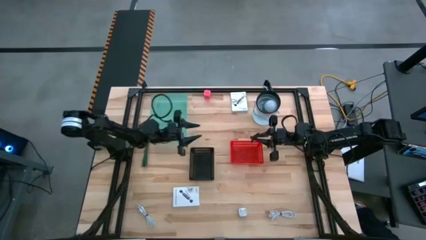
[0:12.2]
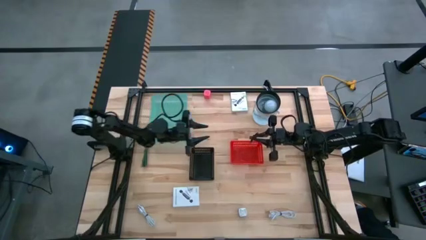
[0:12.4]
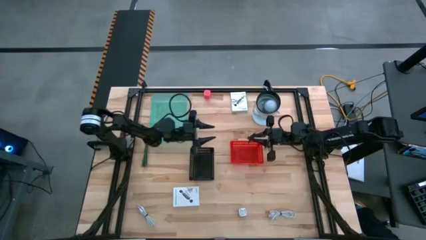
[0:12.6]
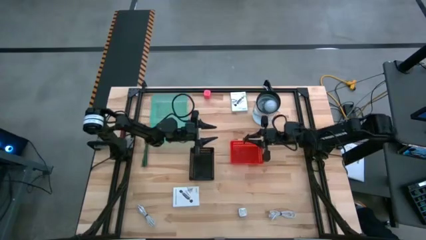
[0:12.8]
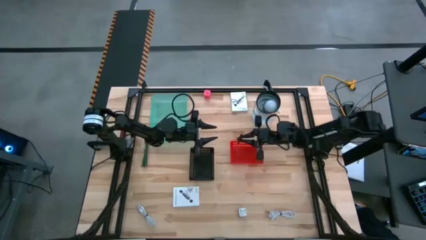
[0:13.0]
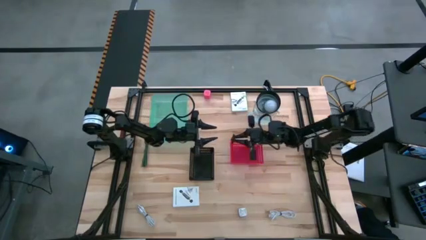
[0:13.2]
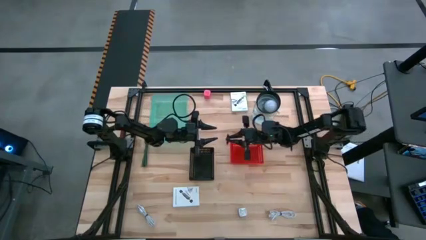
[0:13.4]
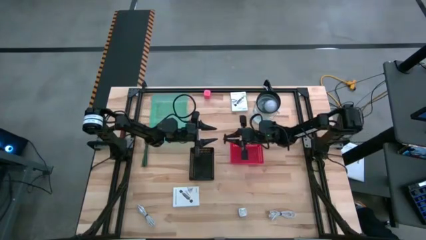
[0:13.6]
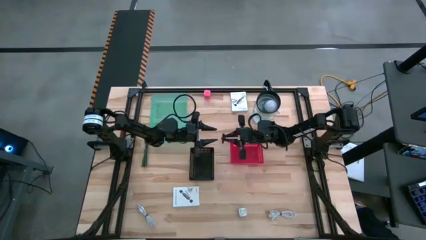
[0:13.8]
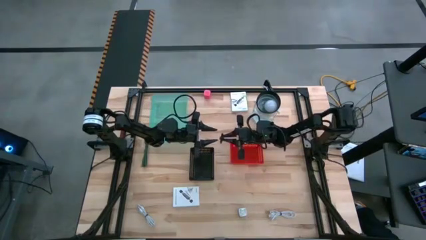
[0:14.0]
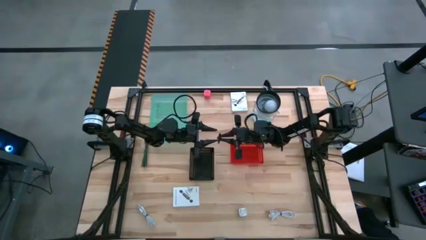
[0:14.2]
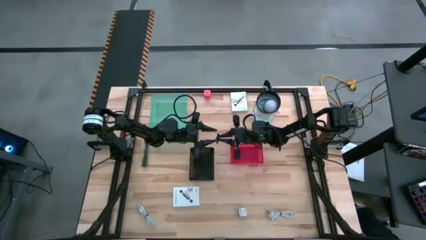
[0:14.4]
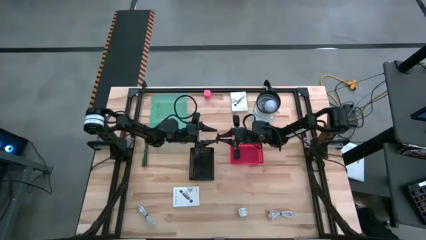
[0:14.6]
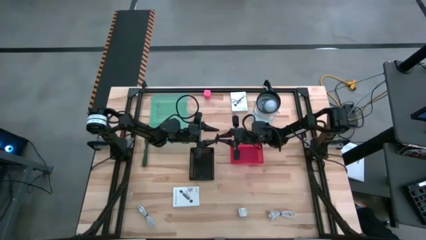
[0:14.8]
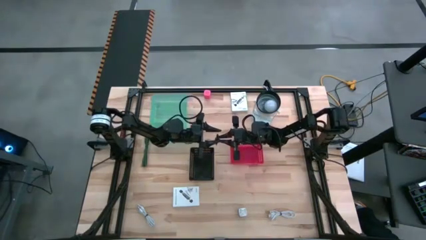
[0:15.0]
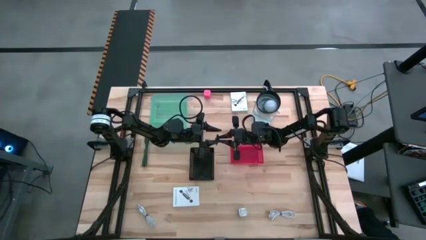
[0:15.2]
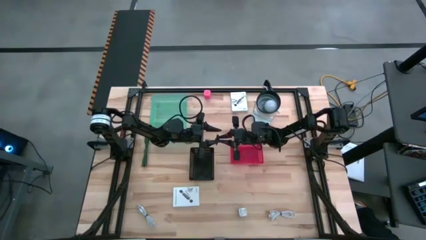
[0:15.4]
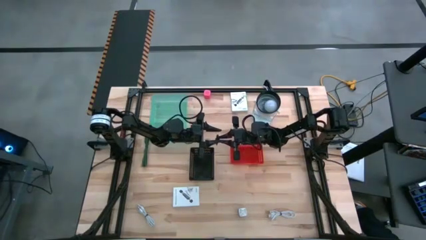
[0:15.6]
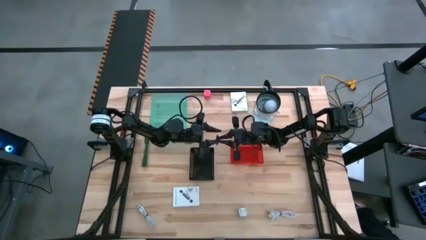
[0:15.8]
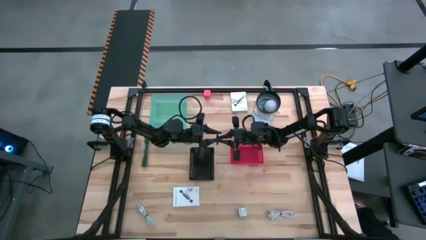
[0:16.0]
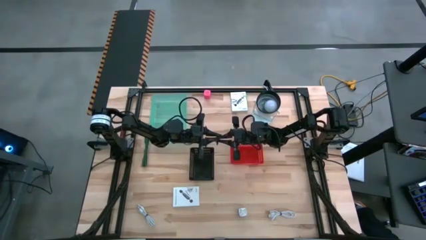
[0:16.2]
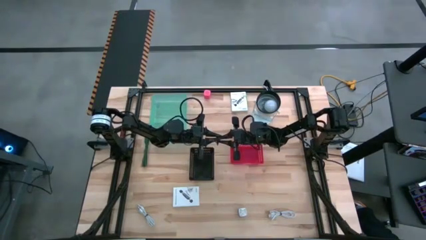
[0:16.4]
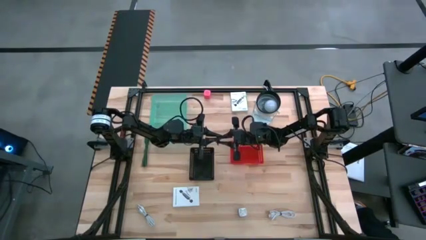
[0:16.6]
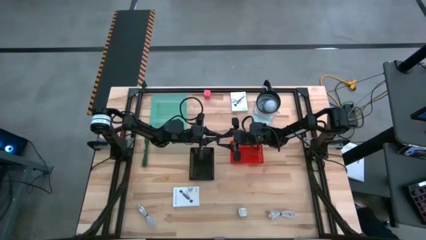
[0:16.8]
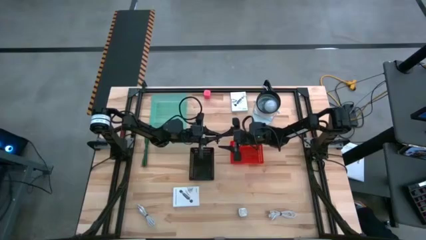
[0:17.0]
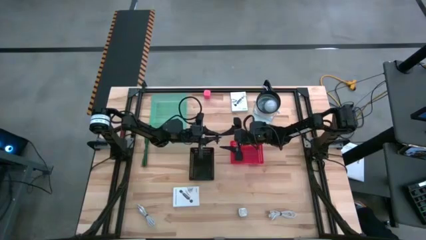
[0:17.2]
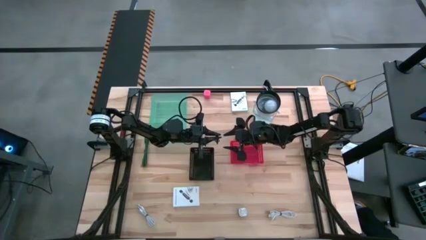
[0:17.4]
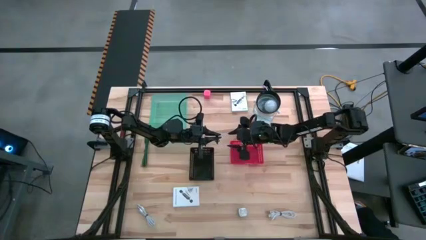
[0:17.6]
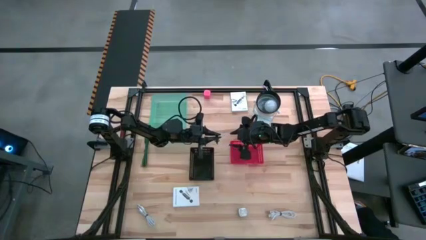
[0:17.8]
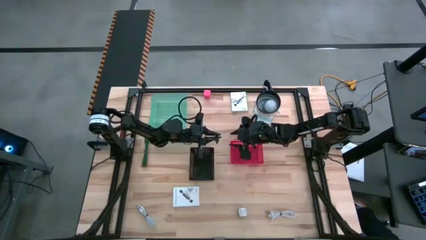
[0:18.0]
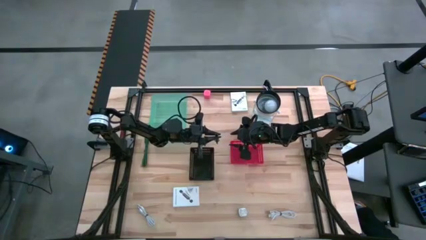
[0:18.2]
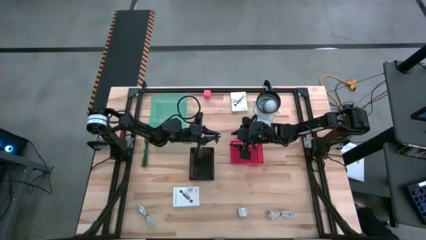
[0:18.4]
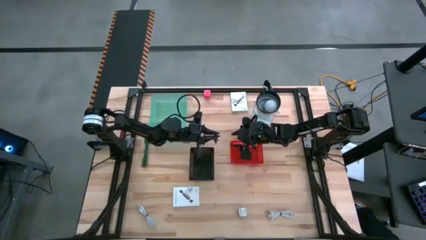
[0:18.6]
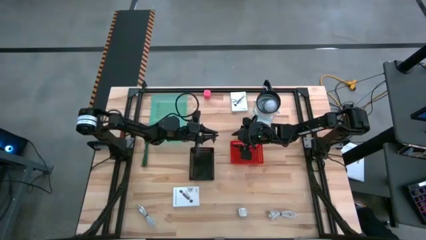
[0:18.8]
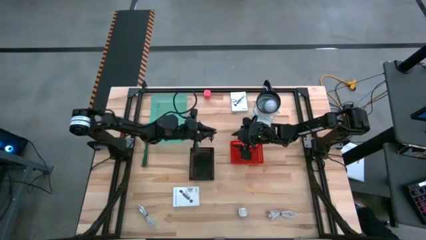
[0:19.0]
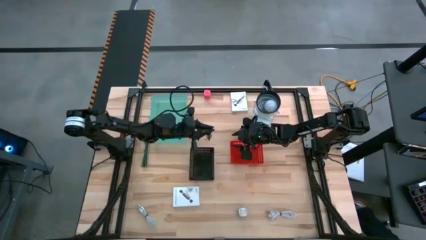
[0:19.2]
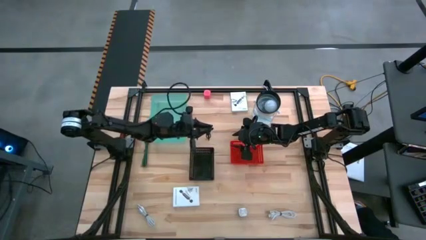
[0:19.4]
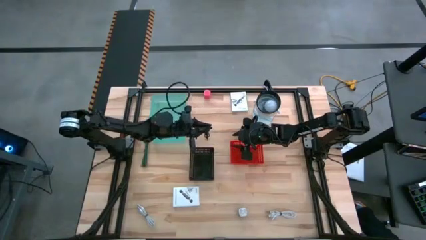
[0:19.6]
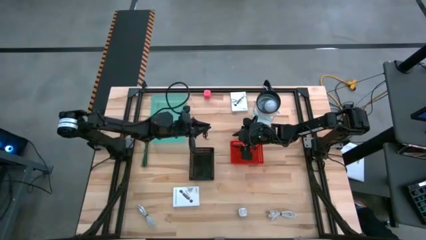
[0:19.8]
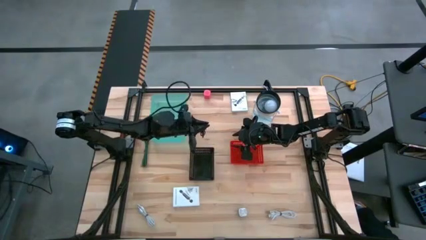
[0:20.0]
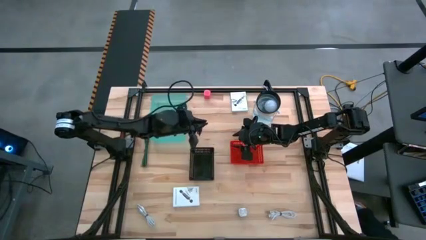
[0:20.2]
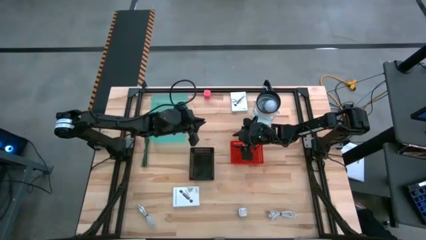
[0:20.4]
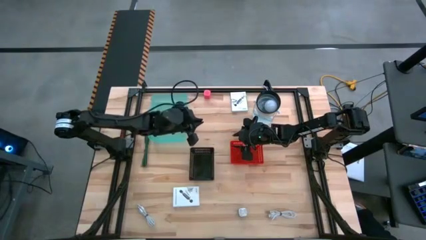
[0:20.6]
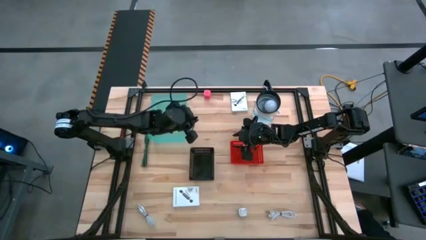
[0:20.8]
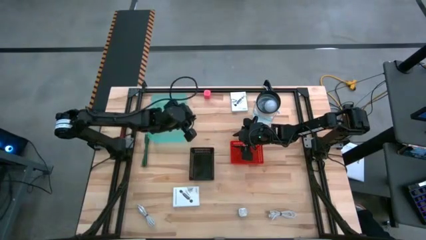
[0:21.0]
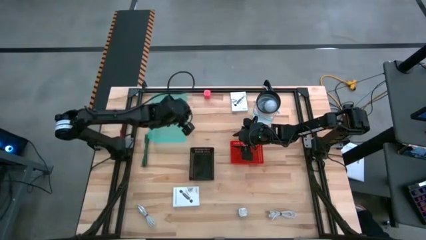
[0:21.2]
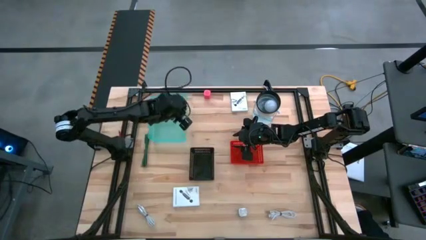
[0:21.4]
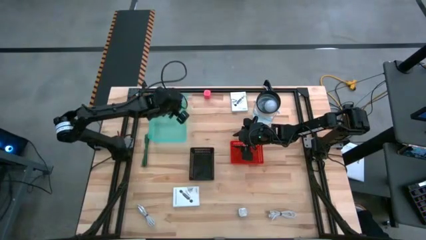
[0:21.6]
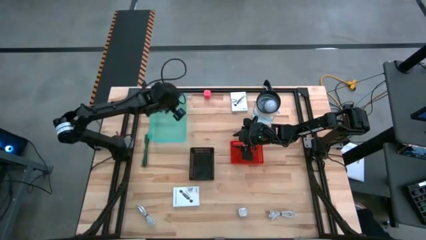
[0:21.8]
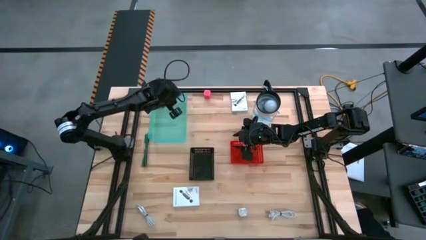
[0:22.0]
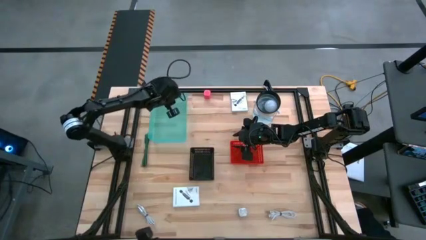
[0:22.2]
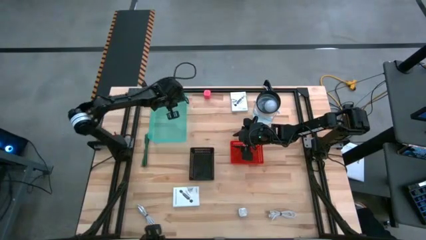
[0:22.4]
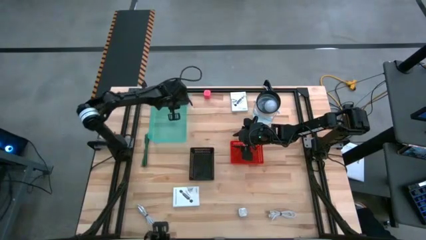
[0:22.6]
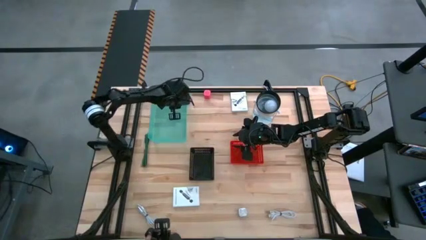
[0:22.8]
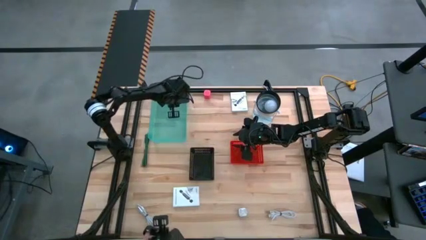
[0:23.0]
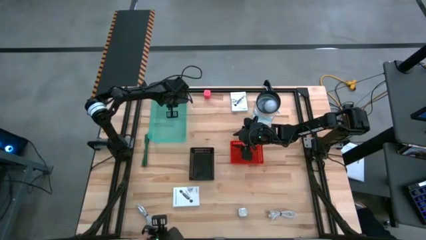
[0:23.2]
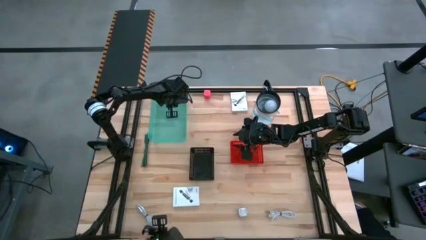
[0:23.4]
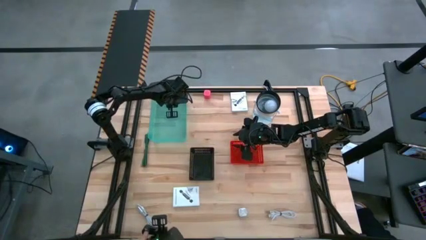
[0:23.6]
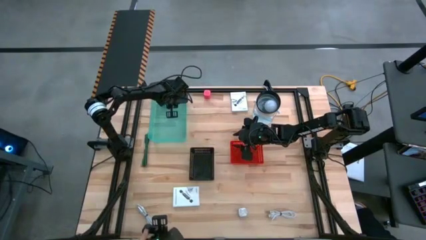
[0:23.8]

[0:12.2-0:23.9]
Task: Pick and place items into bin
Put the black charger cable into the blue bin

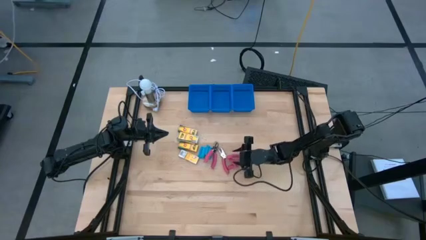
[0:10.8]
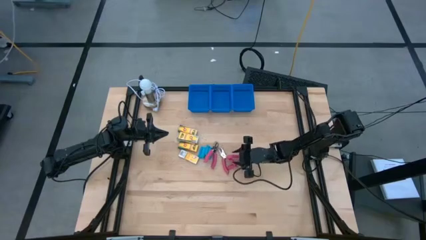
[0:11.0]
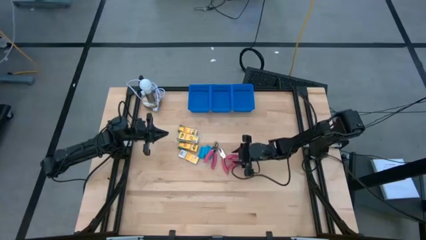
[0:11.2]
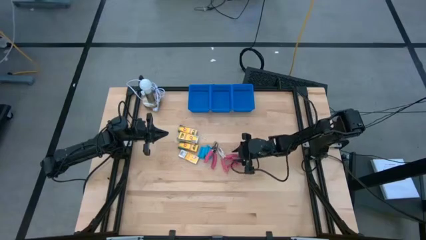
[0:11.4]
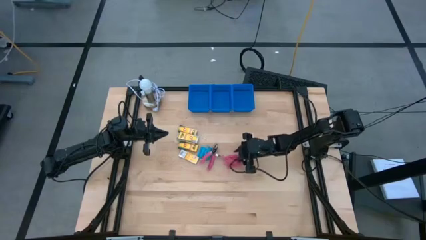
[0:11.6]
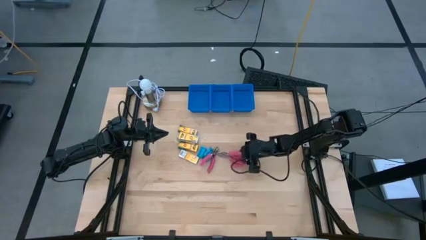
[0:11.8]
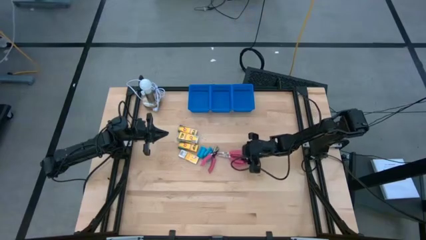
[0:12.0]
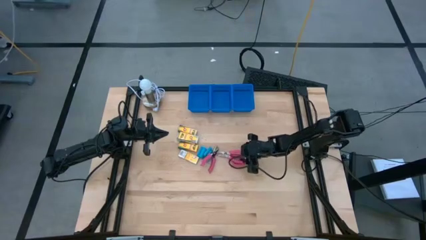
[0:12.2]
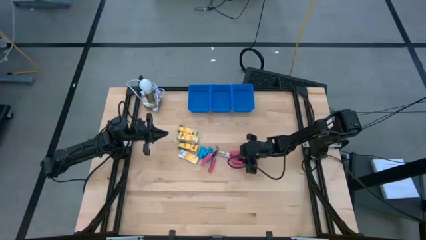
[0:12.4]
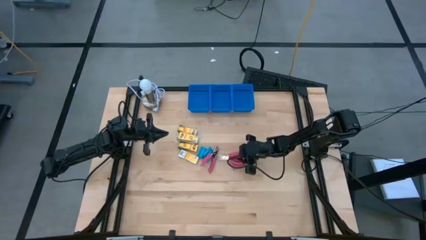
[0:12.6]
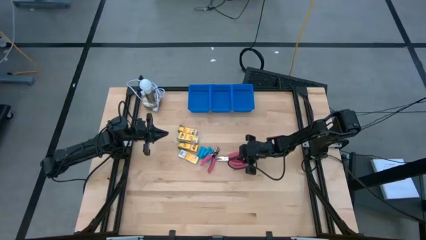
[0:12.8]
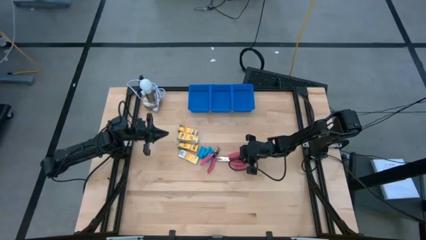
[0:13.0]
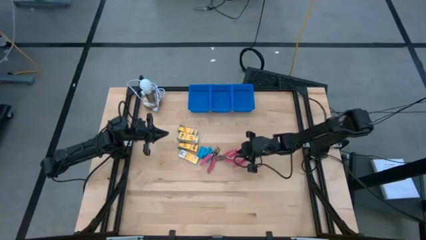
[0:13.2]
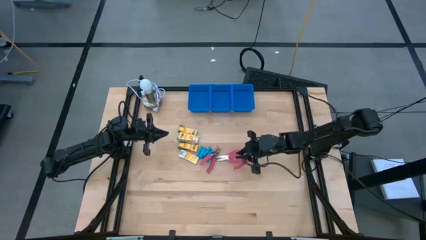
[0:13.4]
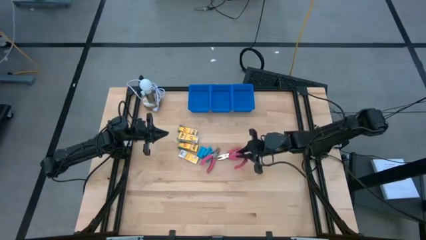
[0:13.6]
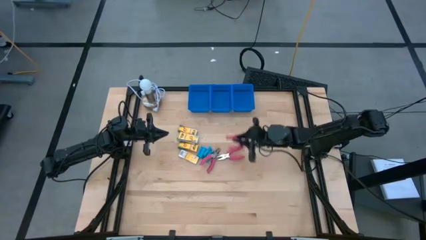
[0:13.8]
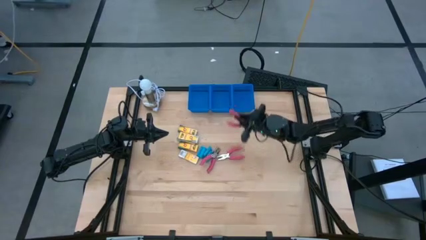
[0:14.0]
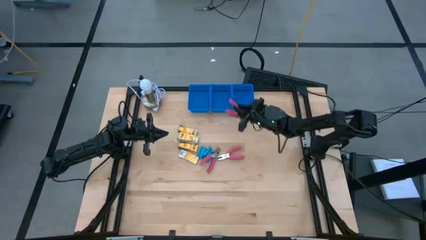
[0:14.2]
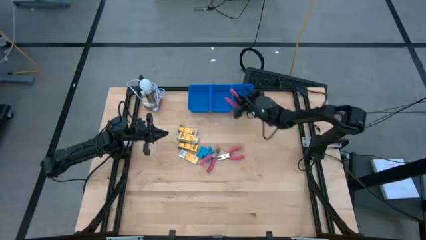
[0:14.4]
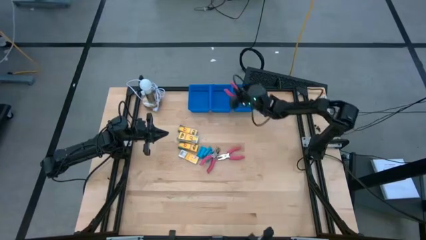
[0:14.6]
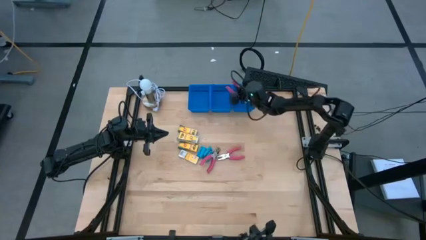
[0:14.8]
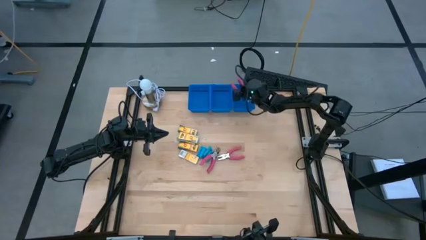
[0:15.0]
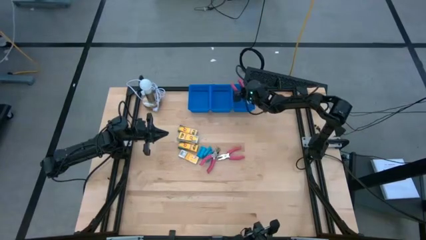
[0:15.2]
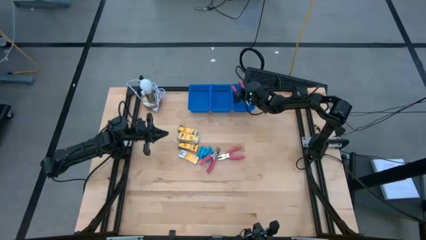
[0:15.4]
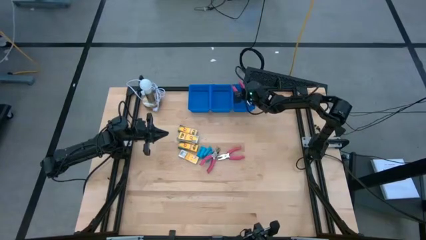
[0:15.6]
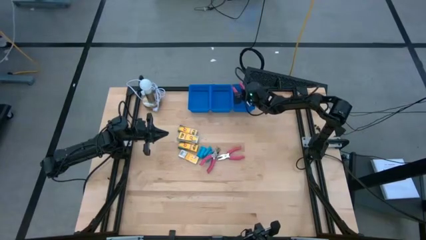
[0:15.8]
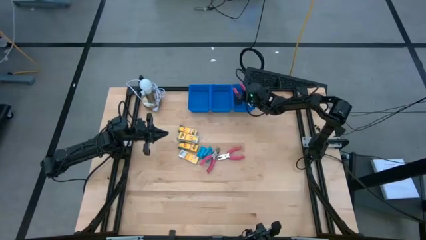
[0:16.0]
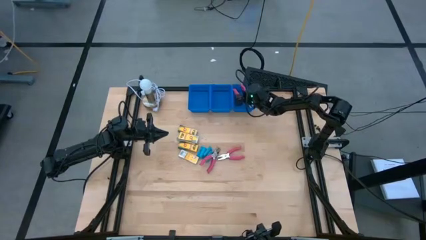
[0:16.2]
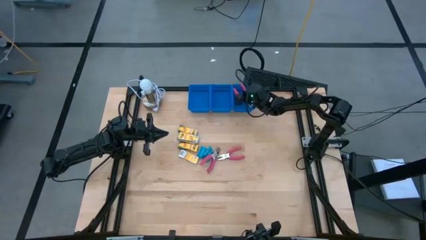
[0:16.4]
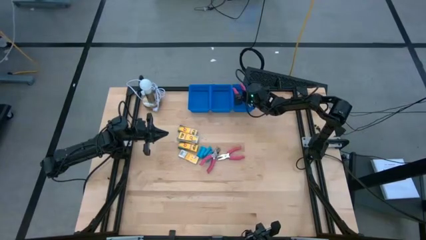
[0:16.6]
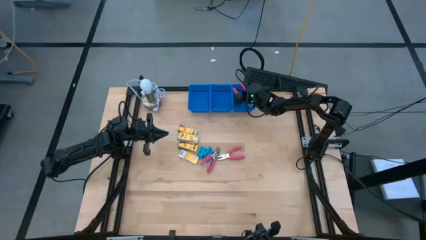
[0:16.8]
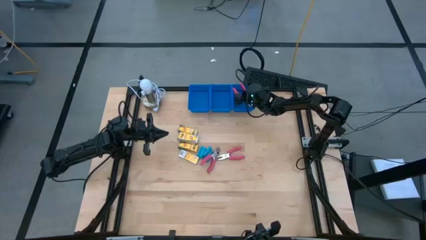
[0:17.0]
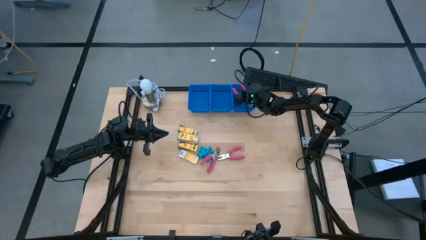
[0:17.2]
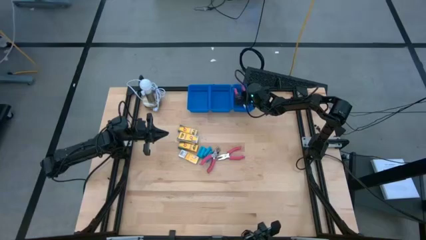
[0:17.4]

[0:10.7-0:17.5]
Task: Pick & Place School Supplies
Put the red ticket punch into the right blue bin
